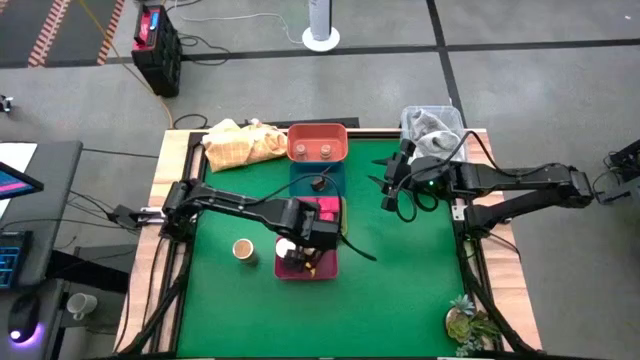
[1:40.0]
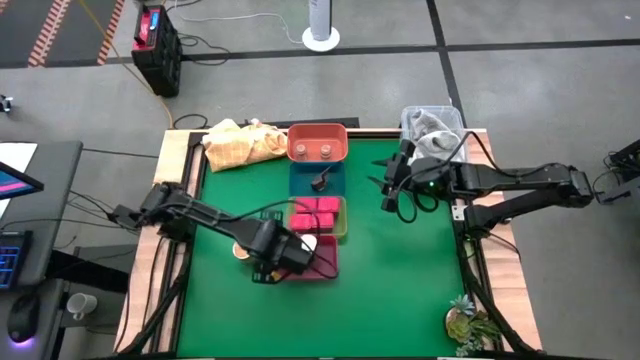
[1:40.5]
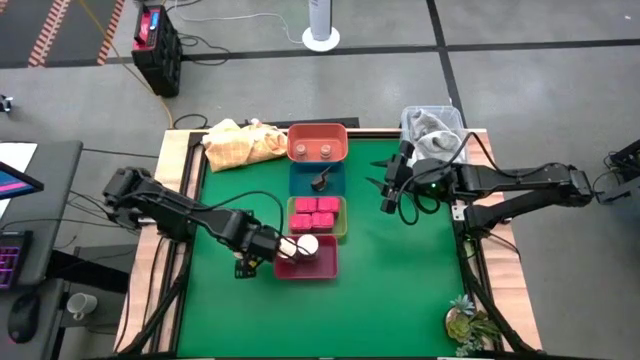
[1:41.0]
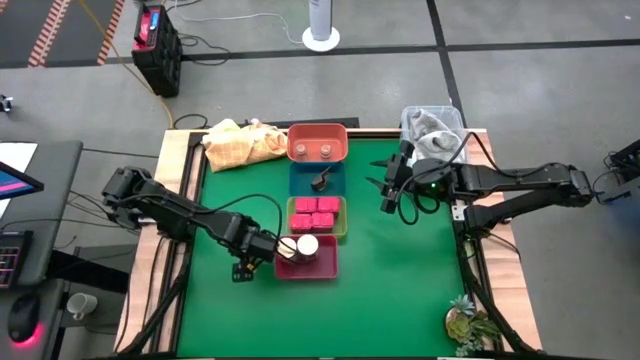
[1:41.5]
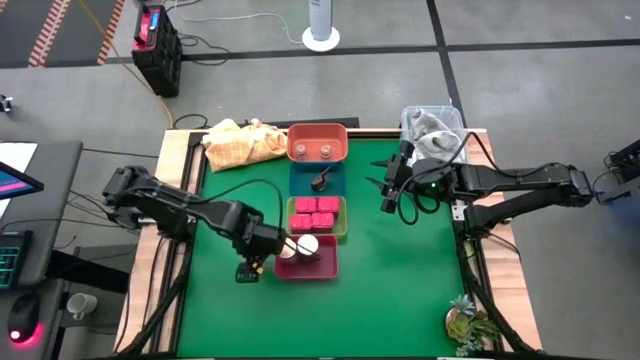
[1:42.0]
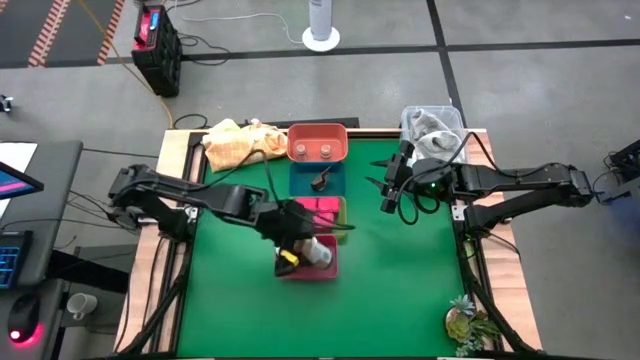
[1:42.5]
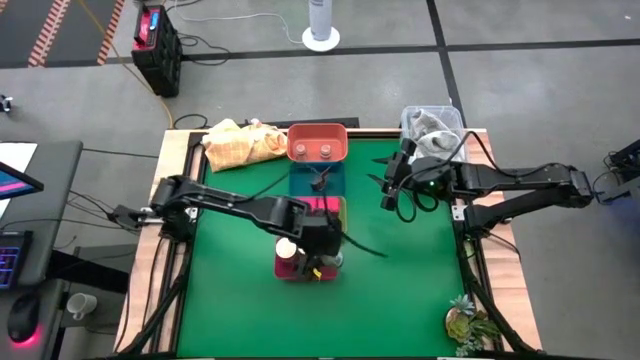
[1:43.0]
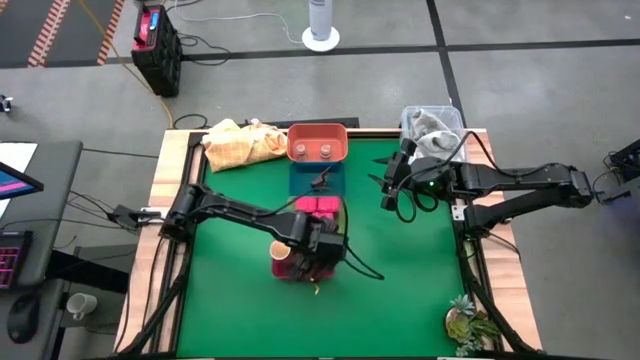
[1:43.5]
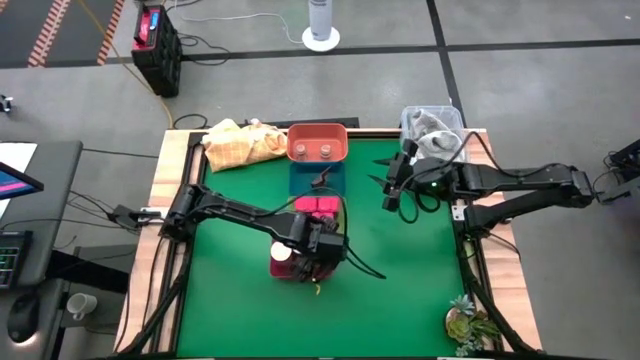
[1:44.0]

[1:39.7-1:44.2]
Task: Sort spices by type
Put the brown seasoning can into the red bin

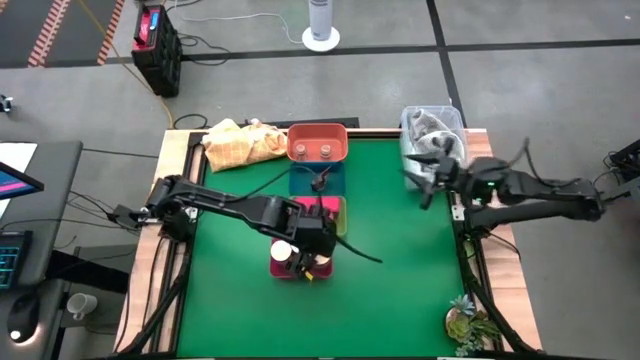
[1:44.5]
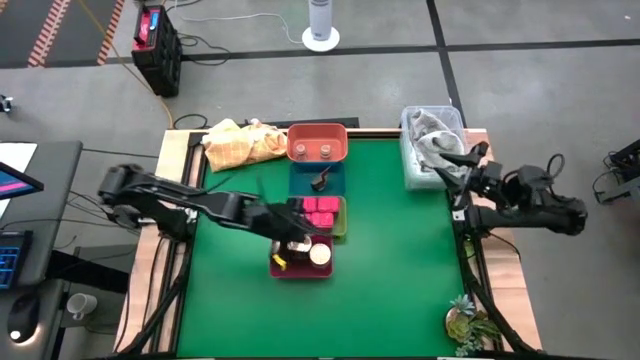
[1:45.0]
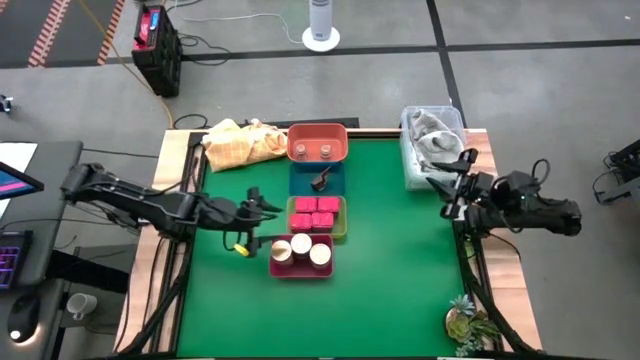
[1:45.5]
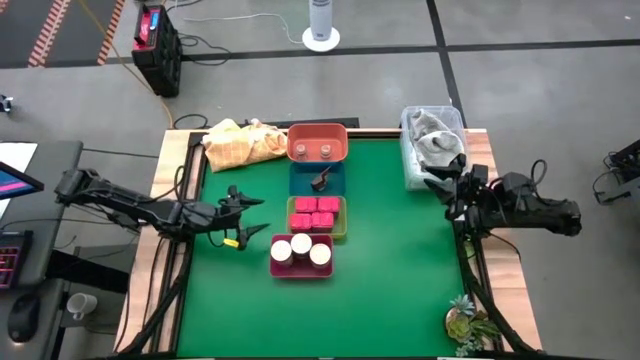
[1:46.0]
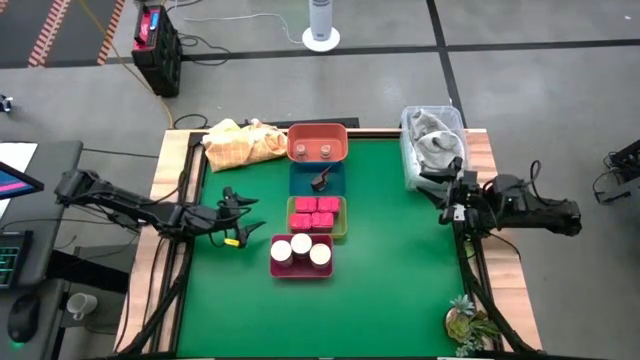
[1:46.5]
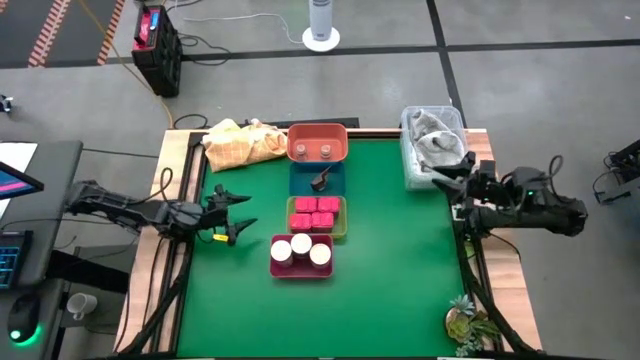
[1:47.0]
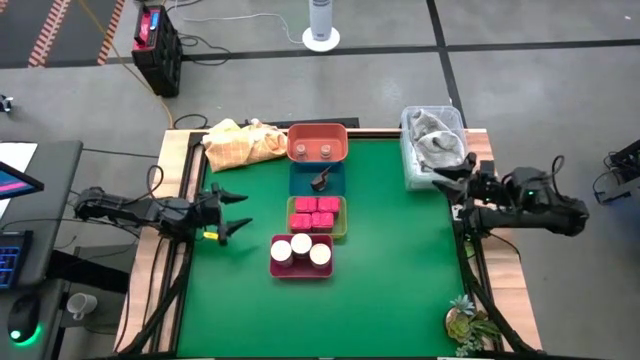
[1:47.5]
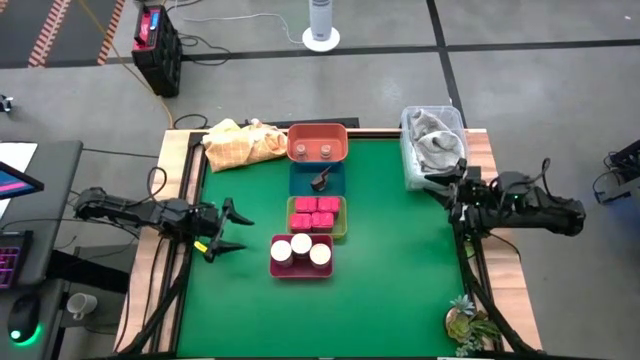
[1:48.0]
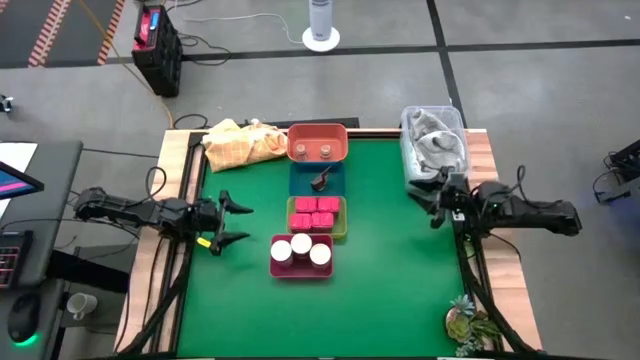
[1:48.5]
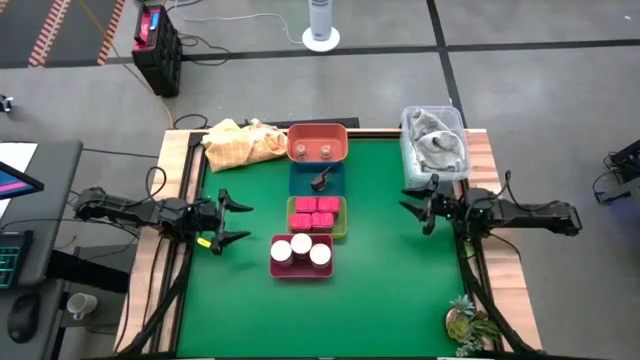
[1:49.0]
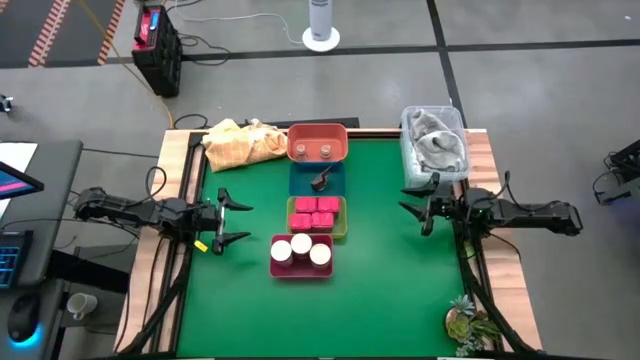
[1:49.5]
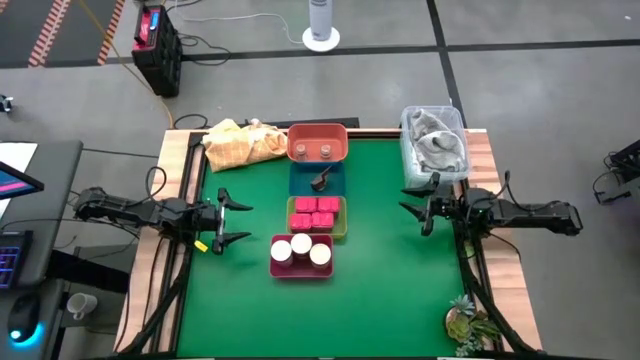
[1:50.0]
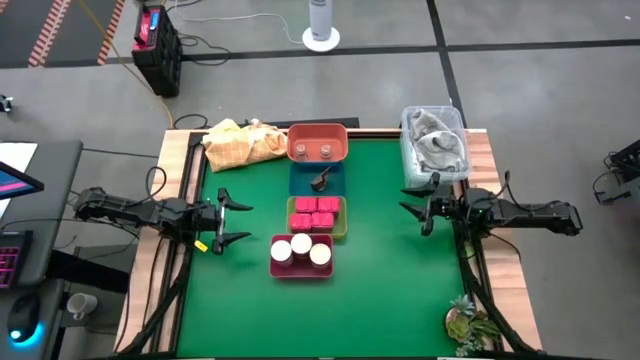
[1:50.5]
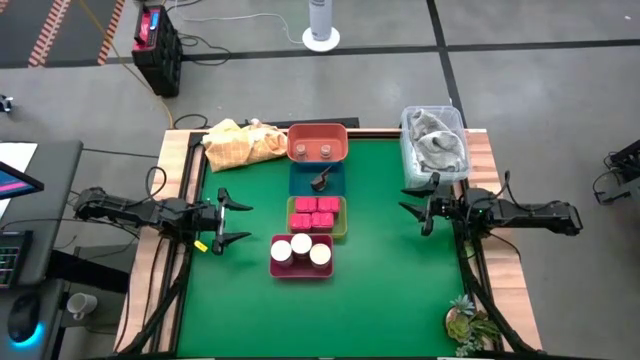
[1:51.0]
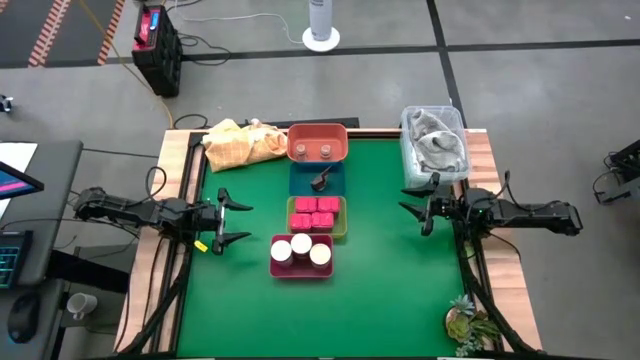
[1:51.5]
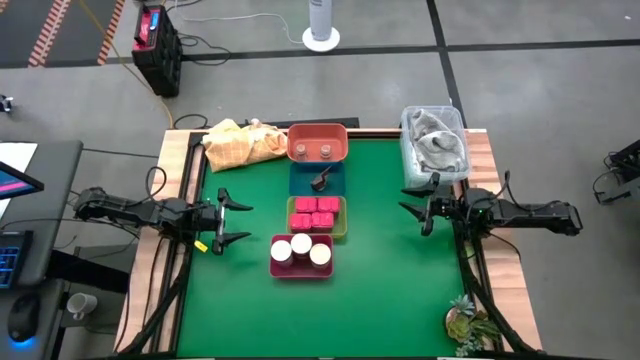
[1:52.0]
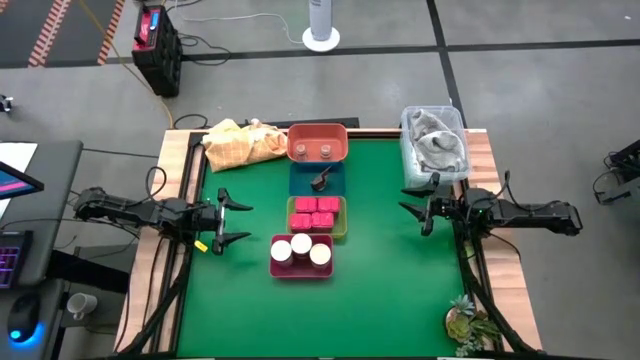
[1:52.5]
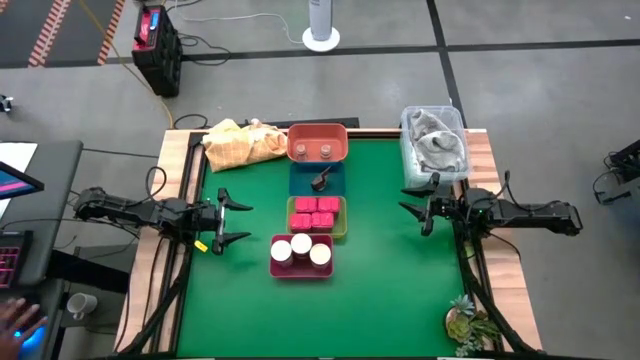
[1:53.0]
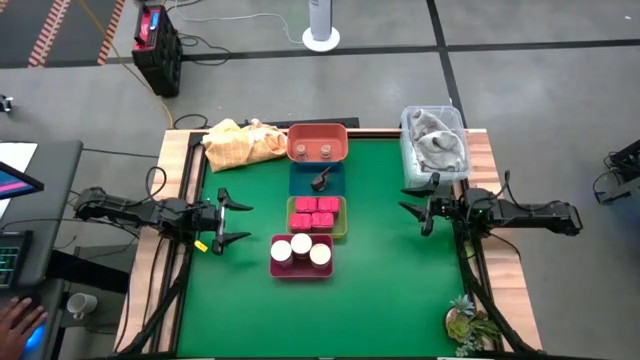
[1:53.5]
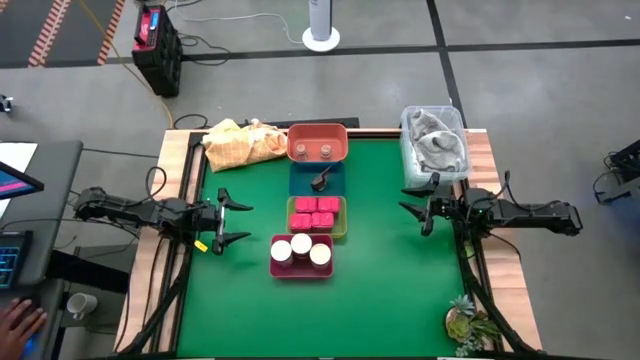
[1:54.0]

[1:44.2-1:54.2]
Return to Home Position

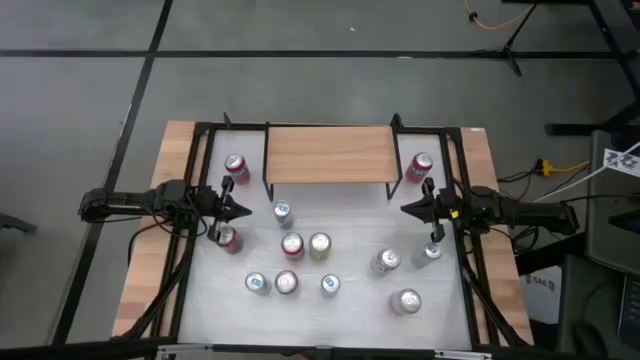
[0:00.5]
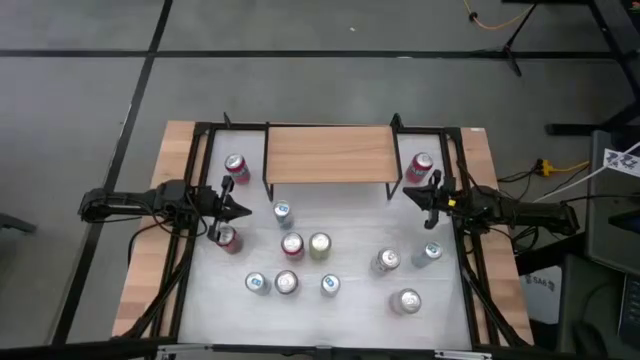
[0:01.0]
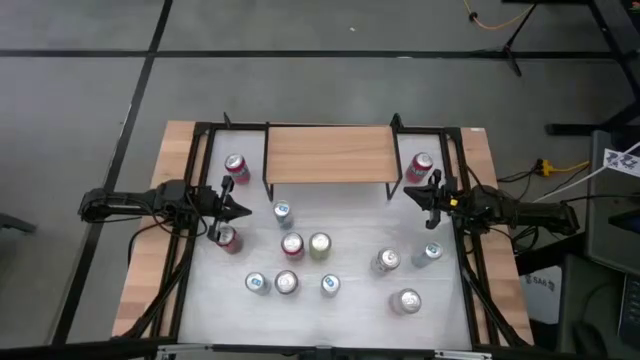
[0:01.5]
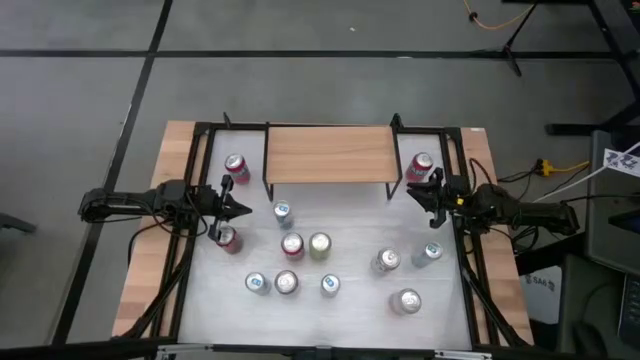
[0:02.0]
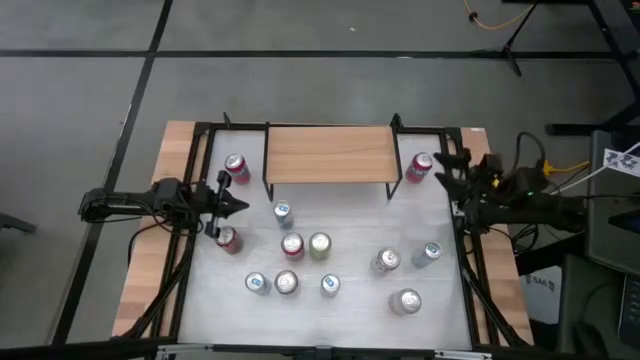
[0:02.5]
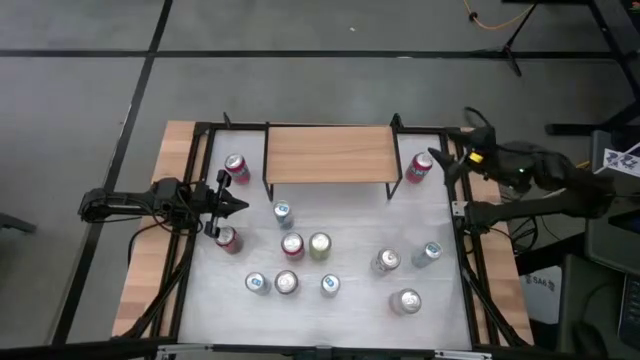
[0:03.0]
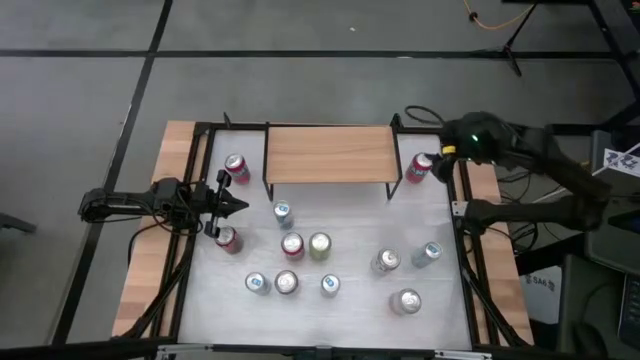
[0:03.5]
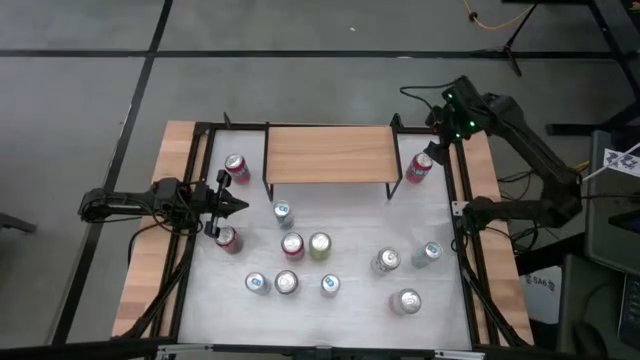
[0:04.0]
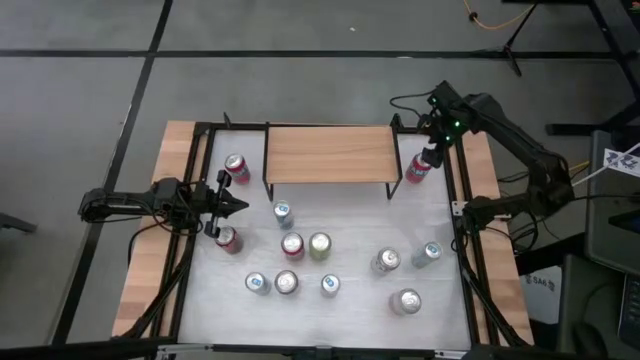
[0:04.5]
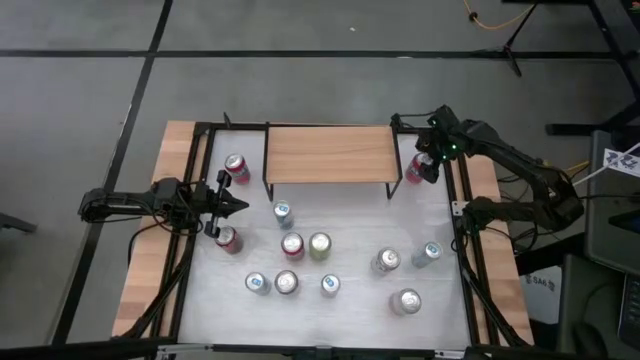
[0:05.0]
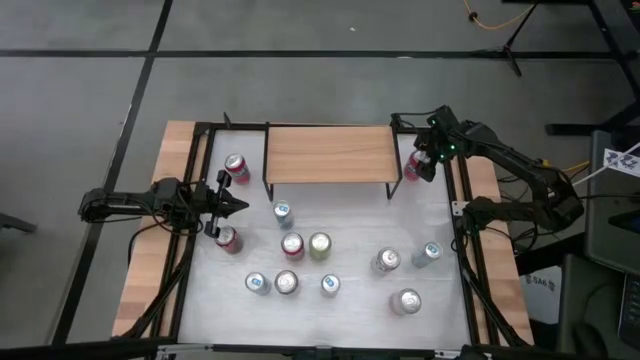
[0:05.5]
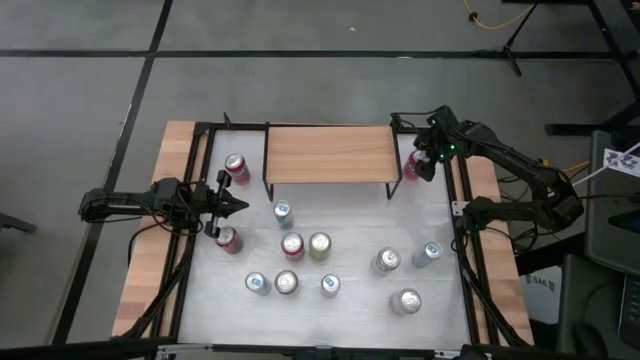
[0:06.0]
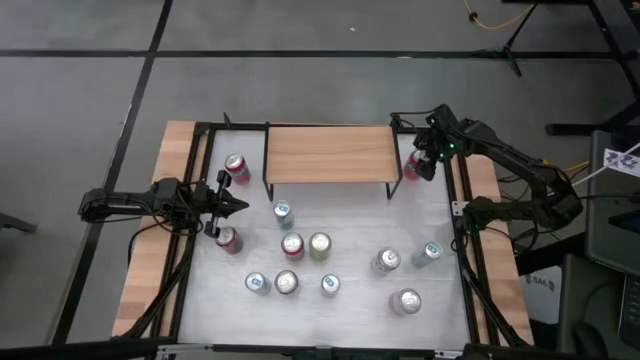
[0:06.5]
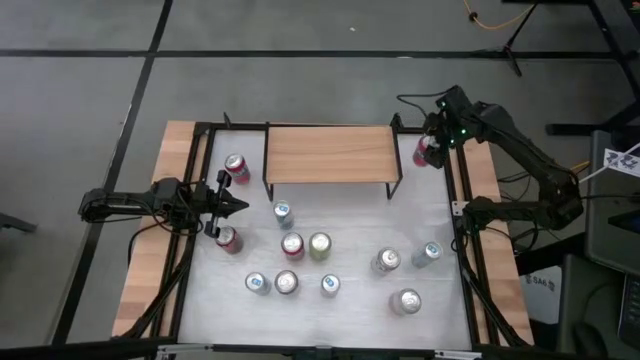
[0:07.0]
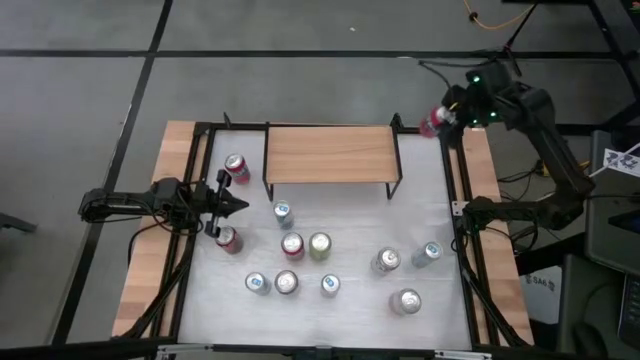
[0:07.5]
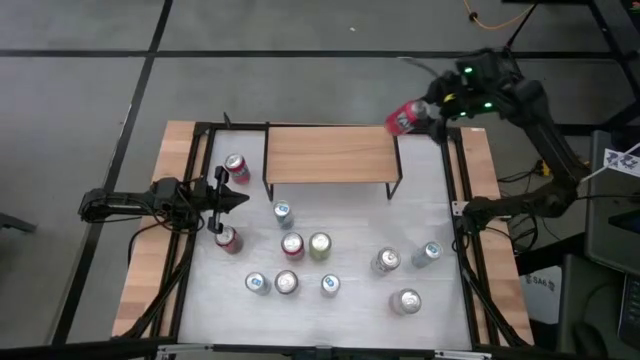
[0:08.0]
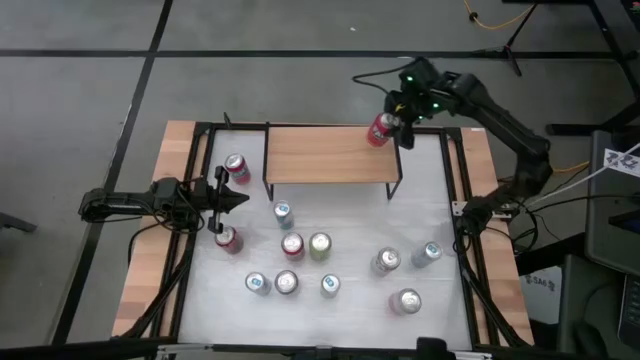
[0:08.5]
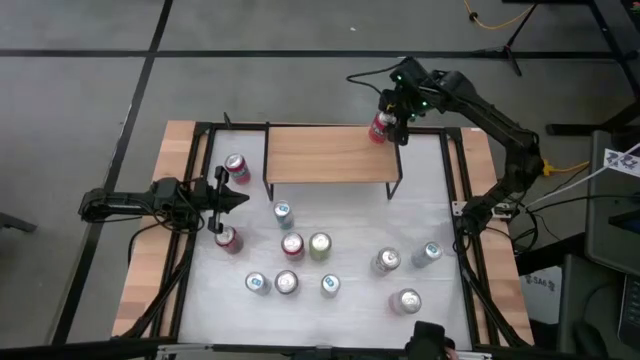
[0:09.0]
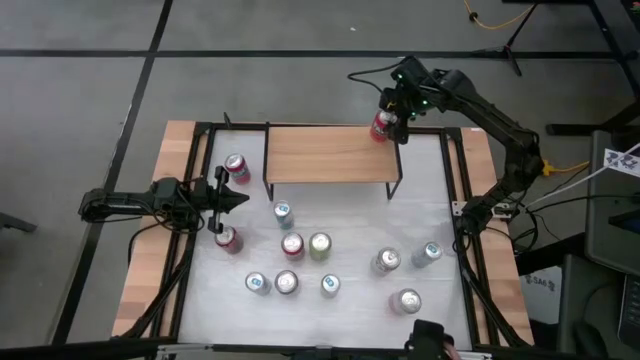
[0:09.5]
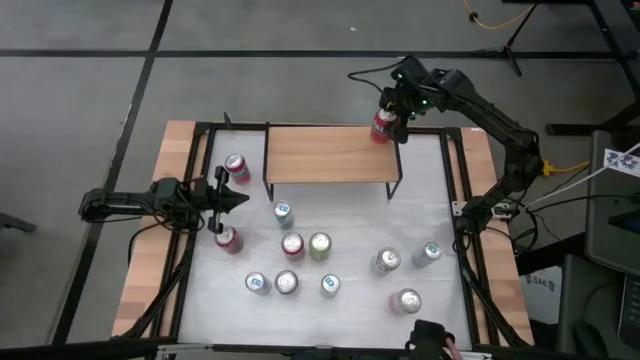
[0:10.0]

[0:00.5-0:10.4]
Task: Sort soda cans
Put the top right red soda can on the shelf
